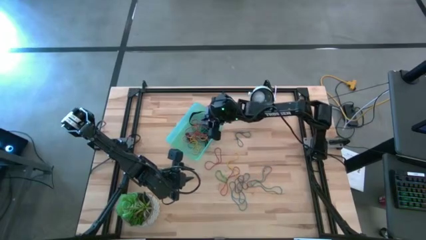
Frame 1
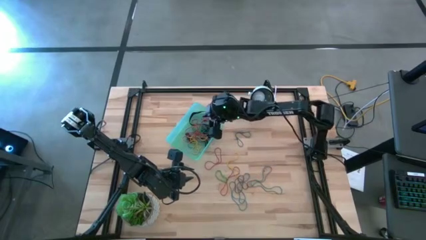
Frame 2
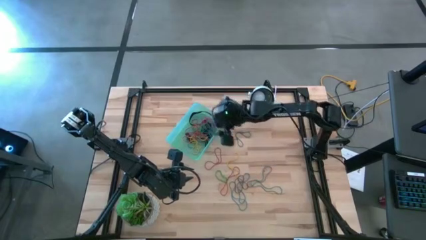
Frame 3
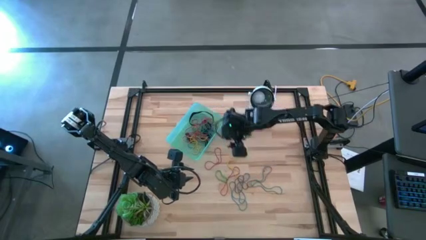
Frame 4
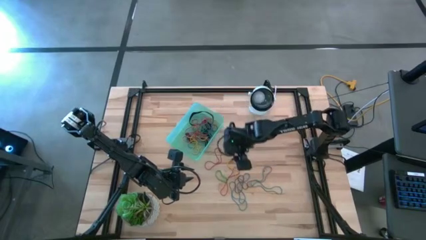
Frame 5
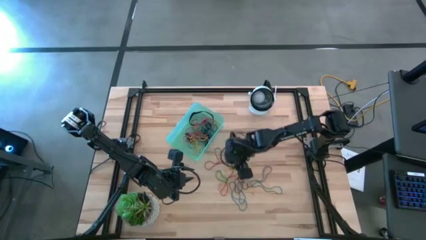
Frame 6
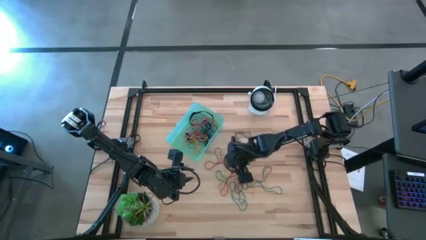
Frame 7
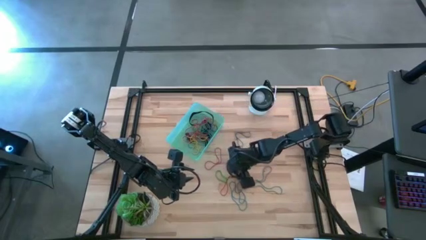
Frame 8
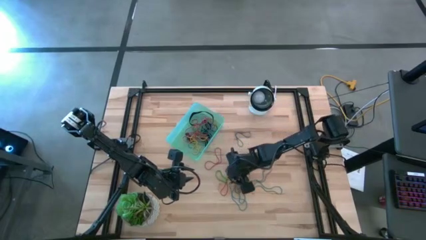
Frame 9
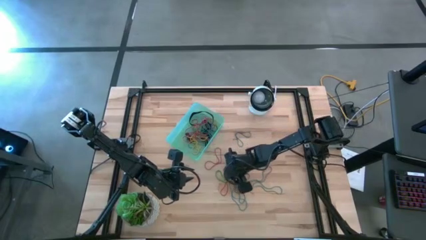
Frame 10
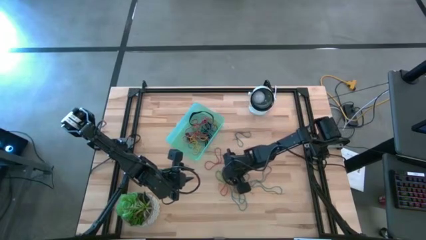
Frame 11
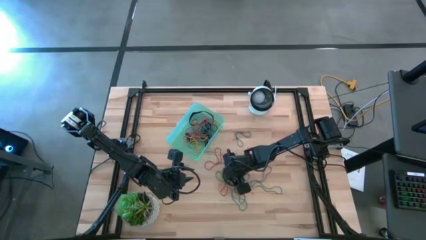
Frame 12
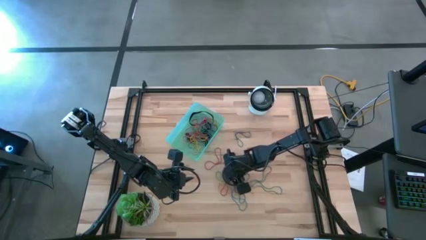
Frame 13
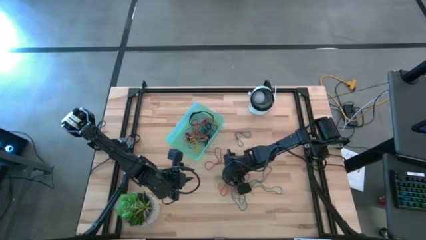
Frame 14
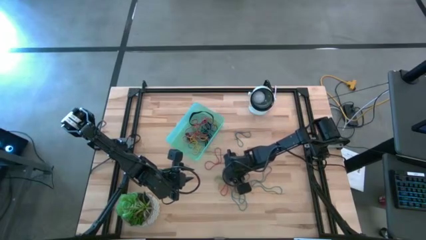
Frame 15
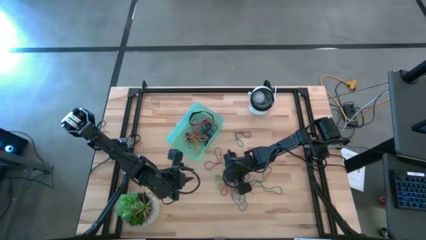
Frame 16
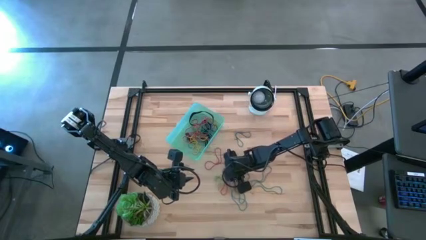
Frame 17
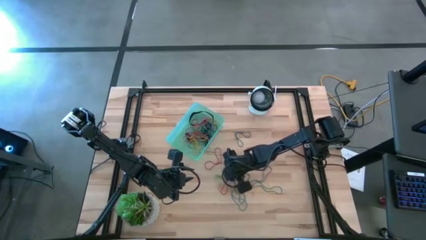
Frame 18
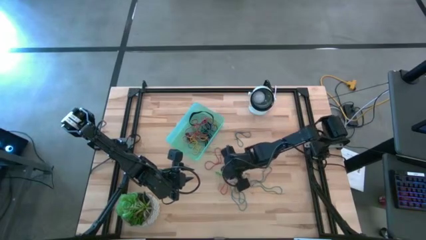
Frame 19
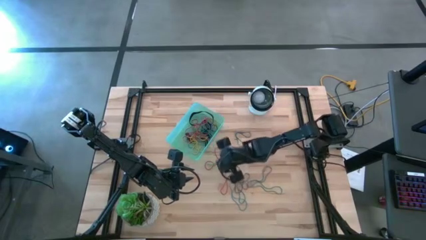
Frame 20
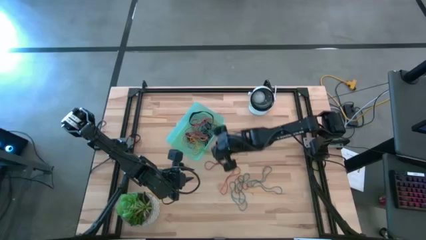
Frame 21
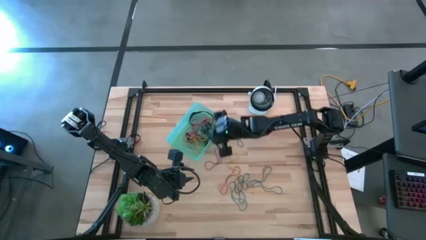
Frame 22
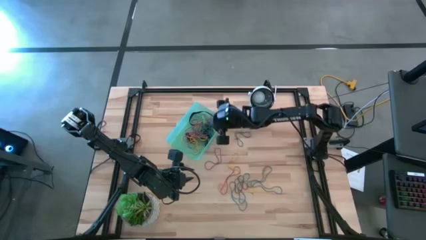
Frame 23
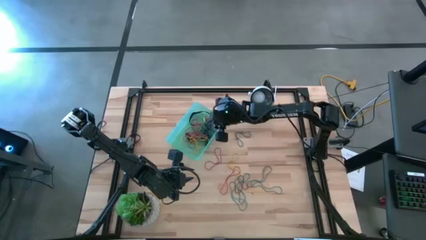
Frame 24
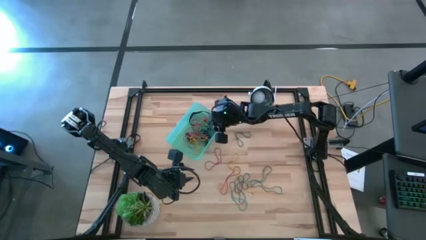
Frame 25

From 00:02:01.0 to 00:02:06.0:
Task: Pick and place rubber bands into bin
Put the green rubber band into the green bin

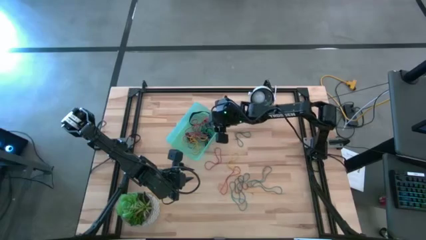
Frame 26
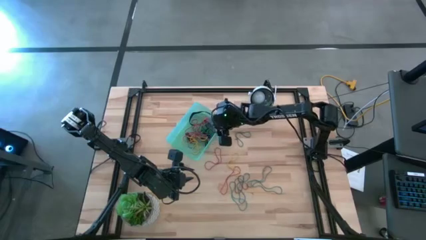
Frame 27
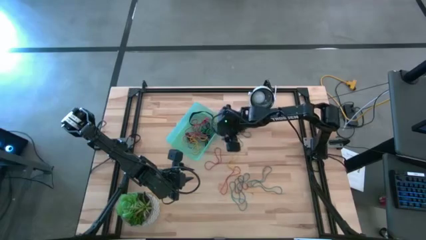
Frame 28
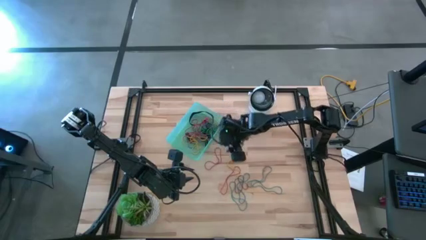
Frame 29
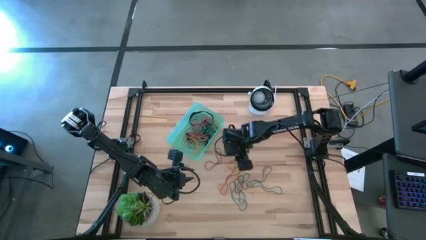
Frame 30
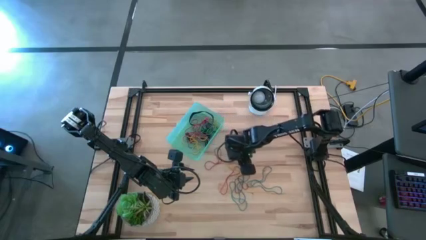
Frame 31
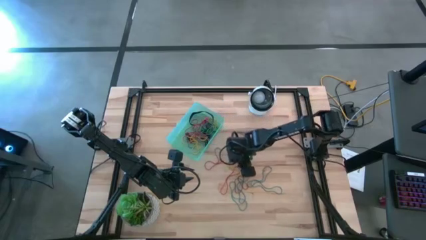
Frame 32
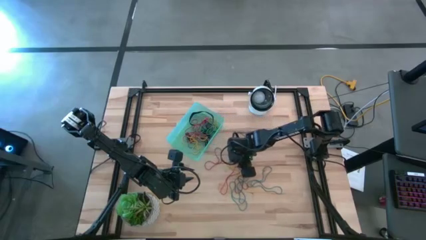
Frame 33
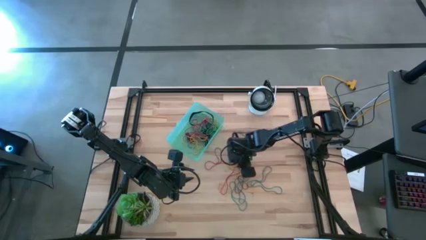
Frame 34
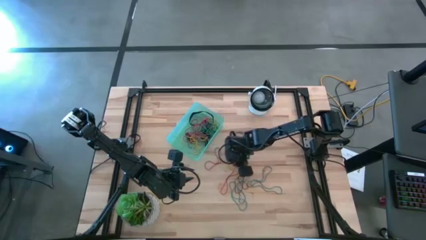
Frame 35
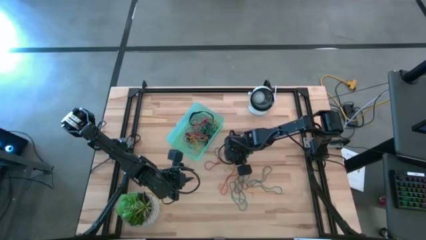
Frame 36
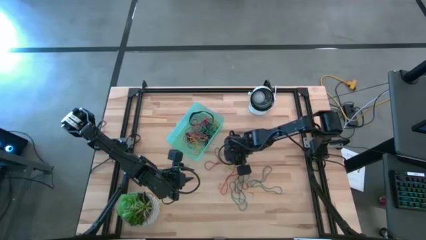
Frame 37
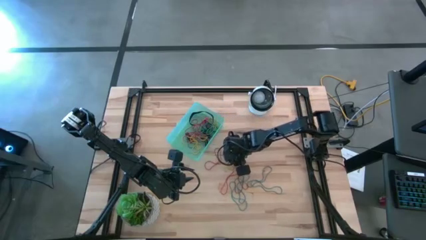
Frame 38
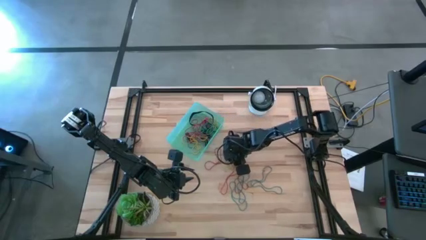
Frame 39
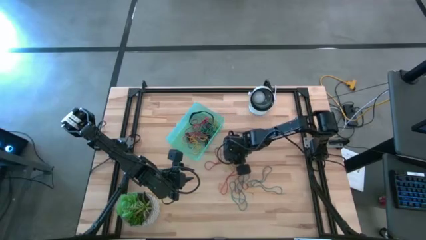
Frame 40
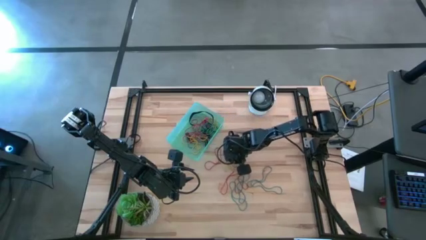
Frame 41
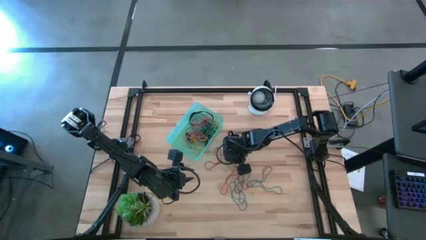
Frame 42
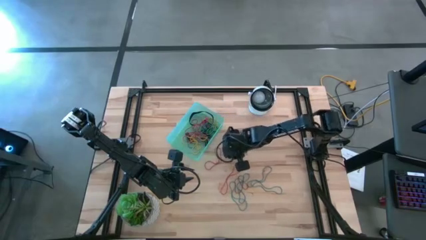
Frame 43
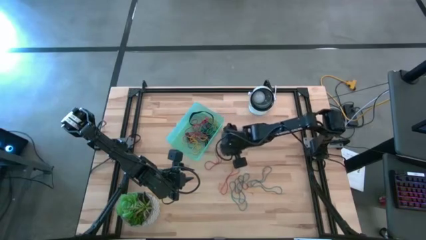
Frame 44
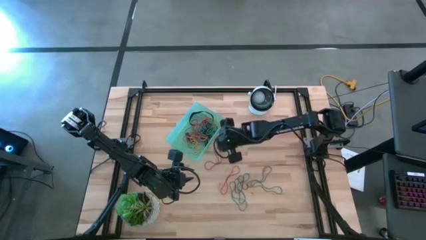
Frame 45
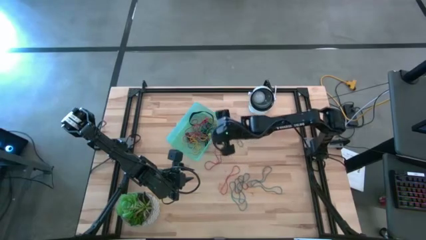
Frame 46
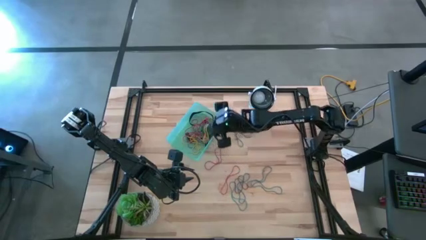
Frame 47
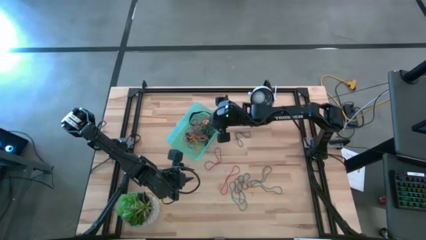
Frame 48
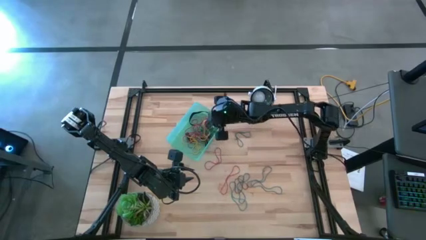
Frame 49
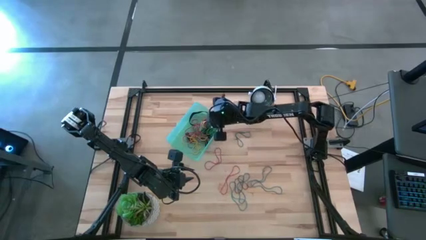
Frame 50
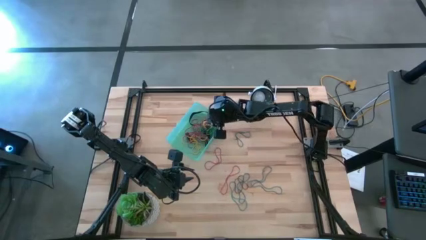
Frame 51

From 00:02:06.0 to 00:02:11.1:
Put the yellow rubber band into the green bin

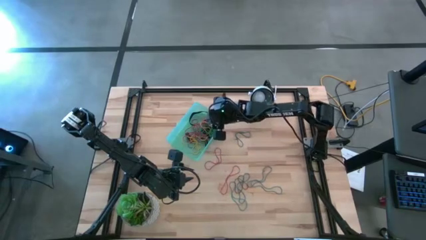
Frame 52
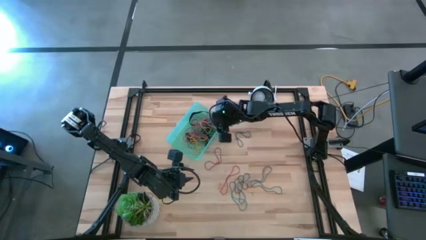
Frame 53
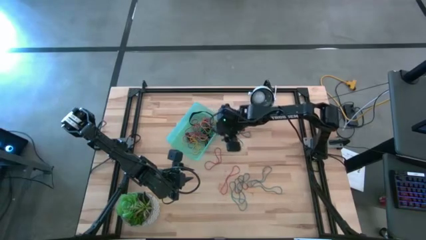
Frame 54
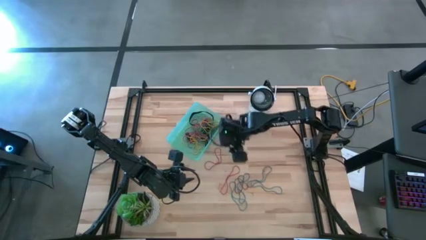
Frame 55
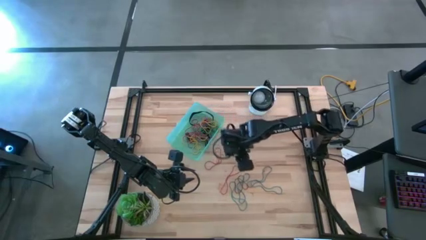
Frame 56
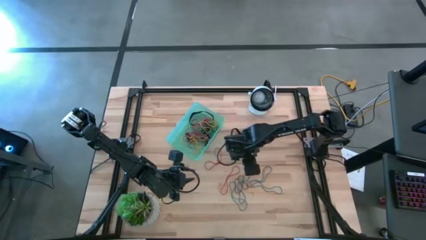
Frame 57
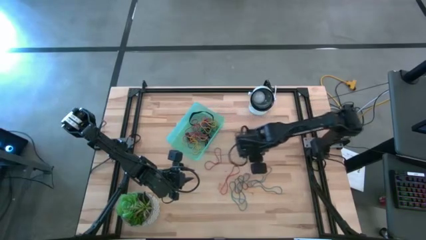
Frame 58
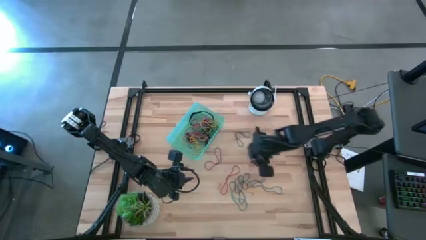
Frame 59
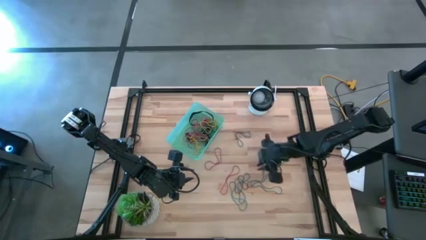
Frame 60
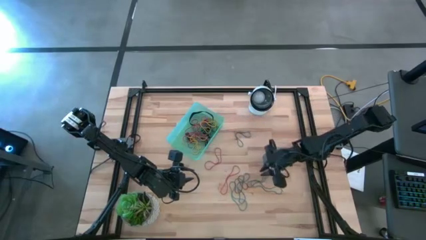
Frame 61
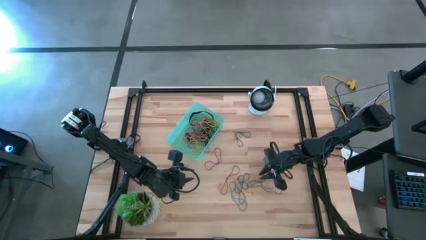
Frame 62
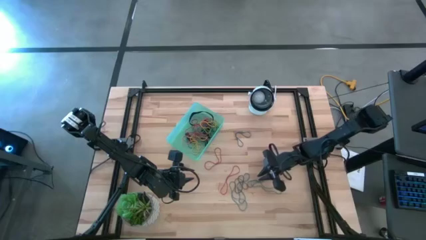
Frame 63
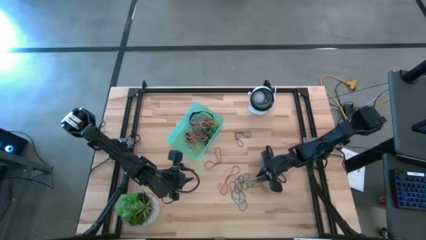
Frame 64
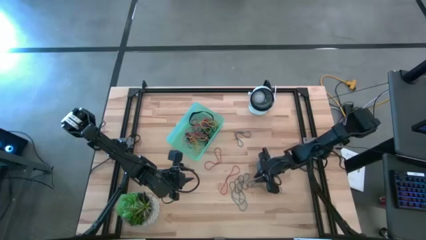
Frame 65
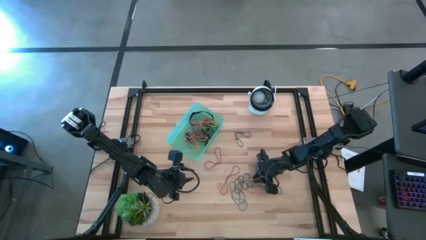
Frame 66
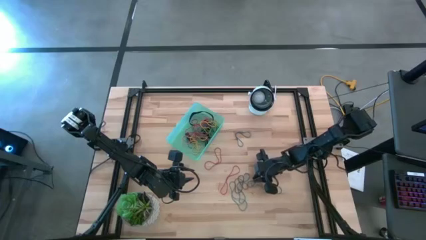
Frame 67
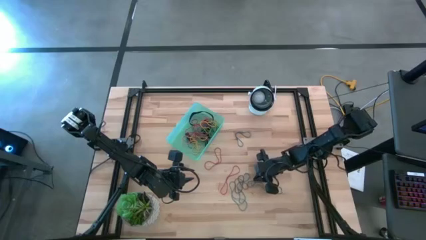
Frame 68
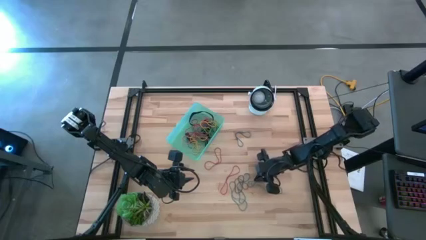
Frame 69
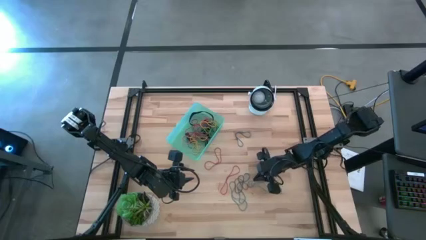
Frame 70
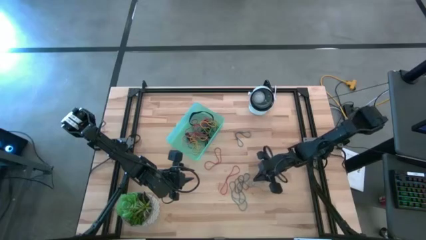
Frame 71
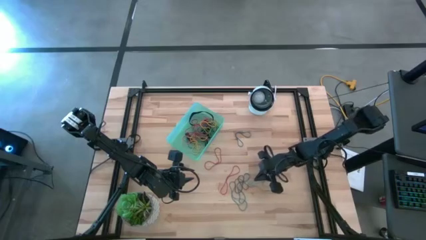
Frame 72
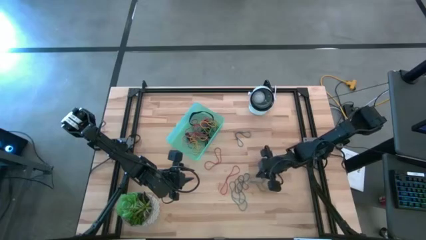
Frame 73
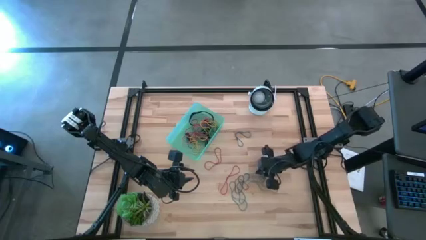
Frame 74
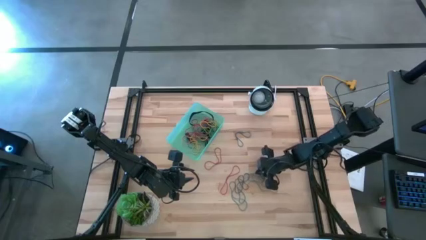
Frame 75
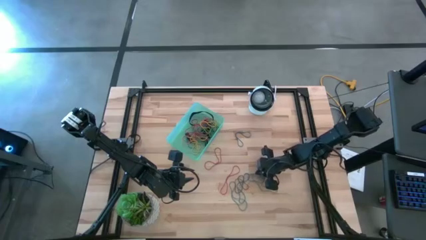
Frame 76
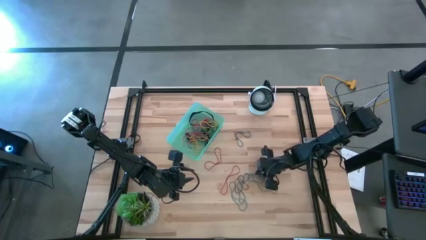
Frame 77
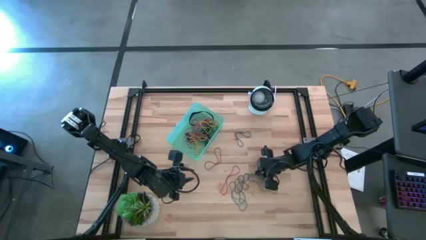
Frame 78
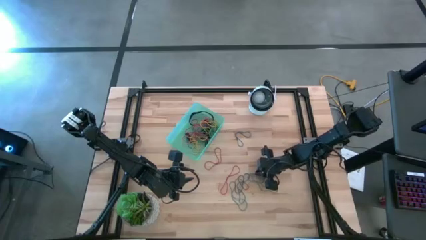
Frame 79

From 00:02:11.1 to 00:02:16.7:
Put the blue rubber band into the green bin
